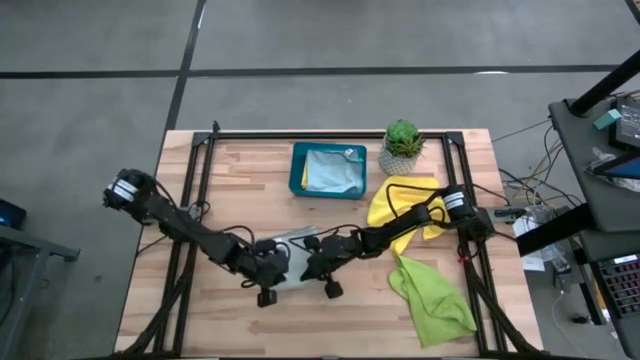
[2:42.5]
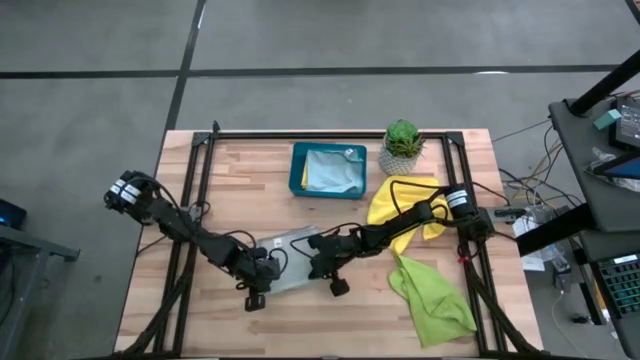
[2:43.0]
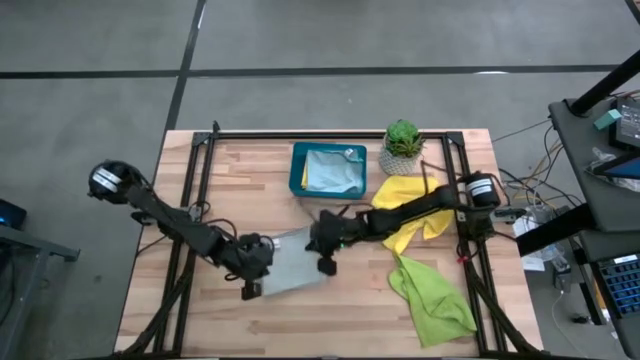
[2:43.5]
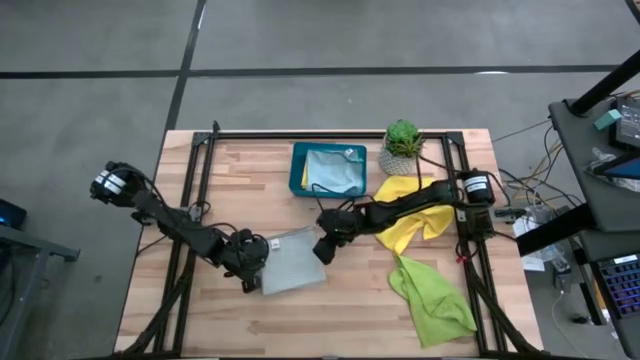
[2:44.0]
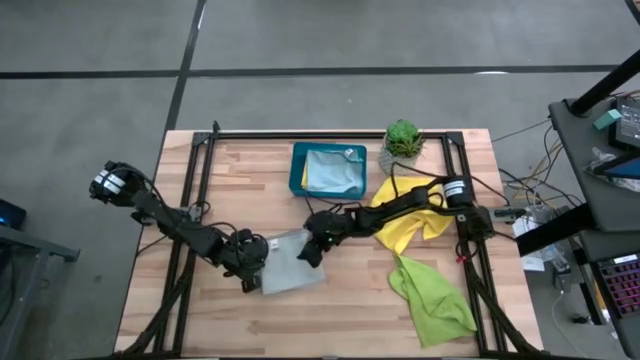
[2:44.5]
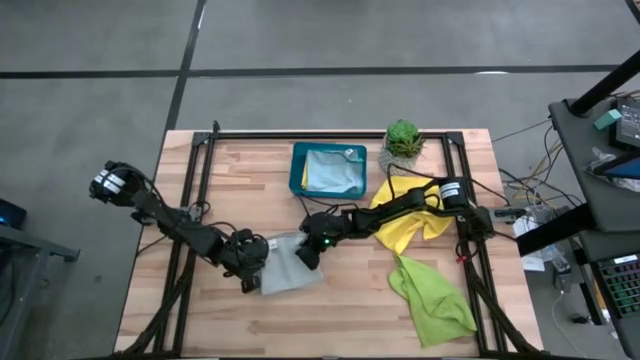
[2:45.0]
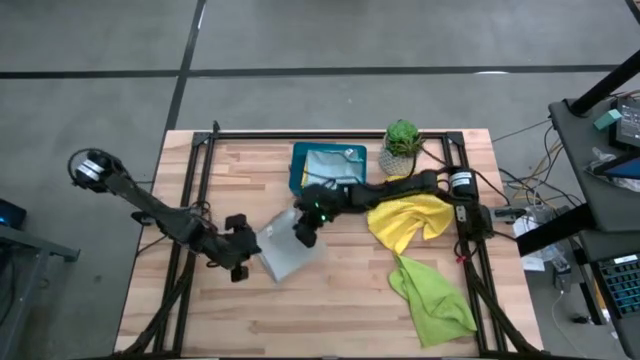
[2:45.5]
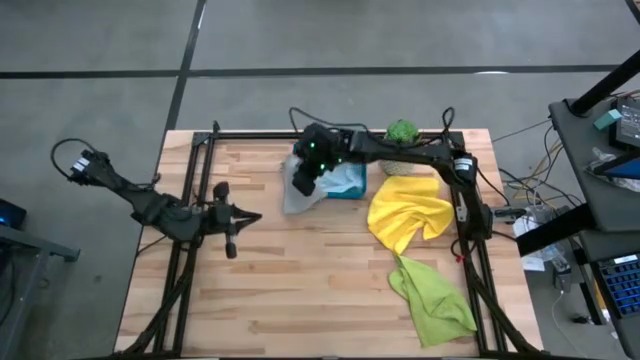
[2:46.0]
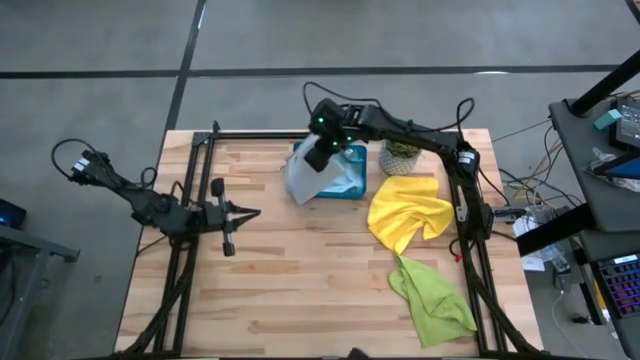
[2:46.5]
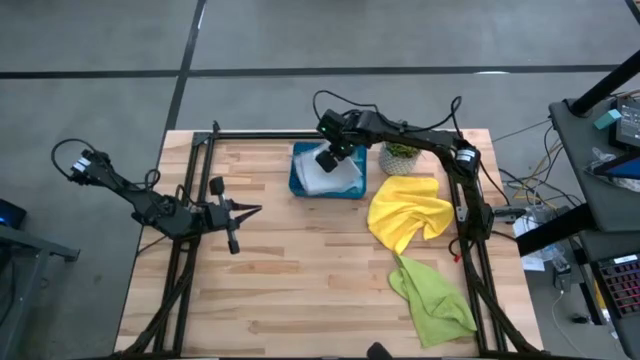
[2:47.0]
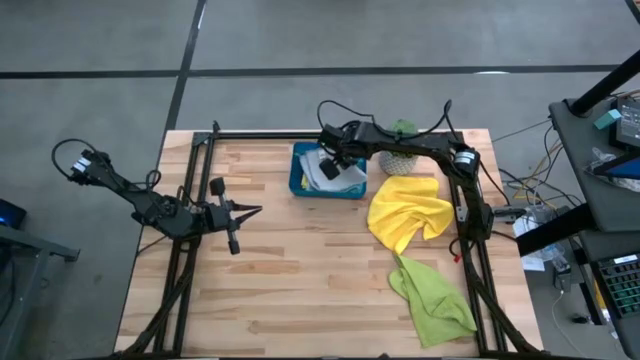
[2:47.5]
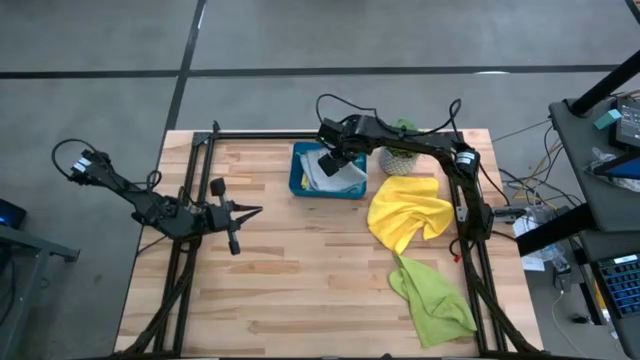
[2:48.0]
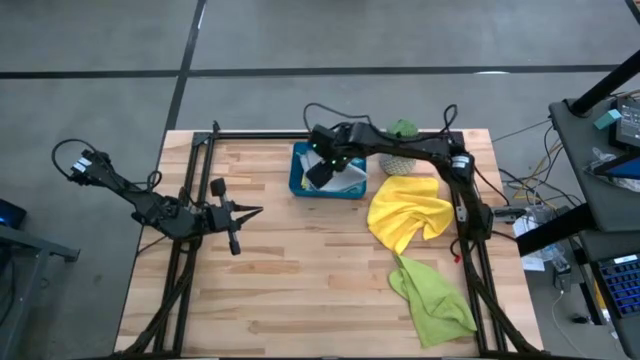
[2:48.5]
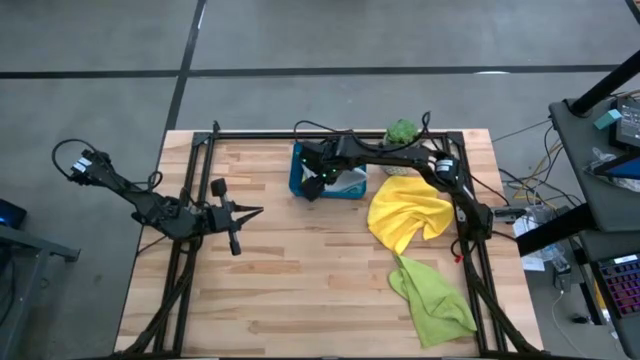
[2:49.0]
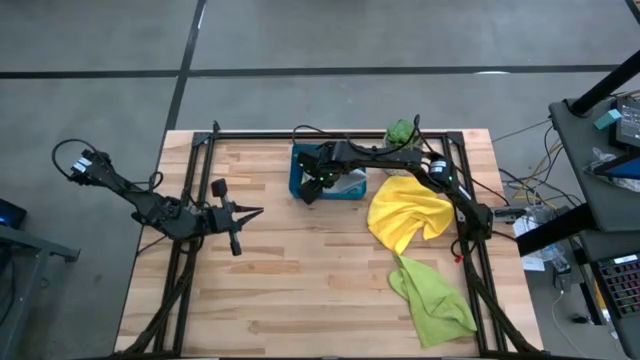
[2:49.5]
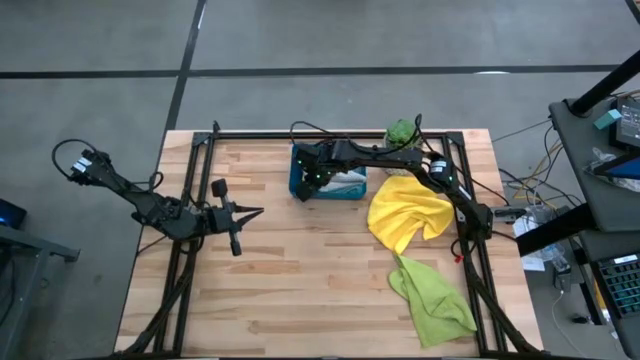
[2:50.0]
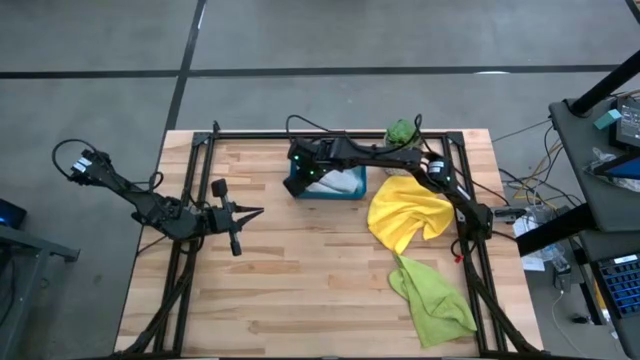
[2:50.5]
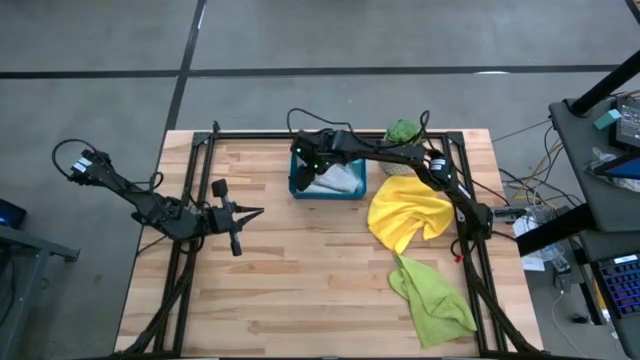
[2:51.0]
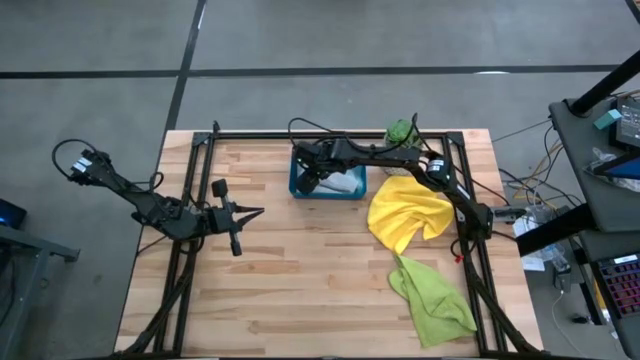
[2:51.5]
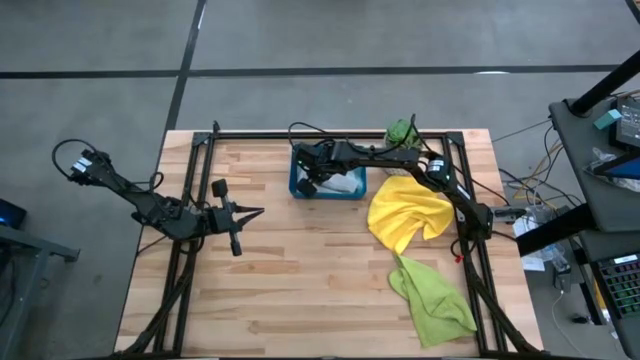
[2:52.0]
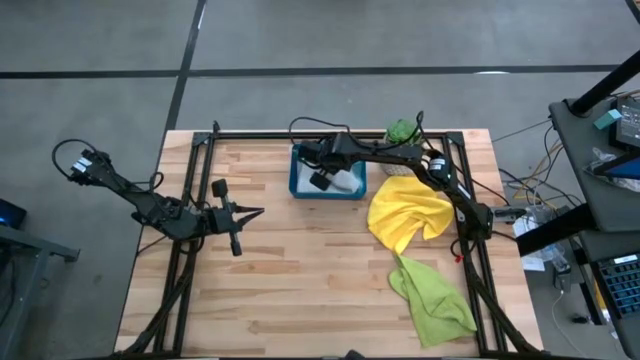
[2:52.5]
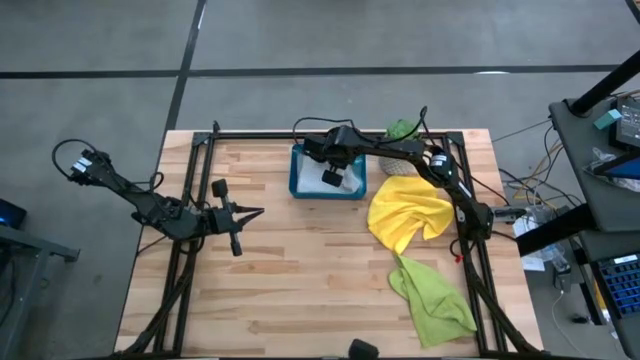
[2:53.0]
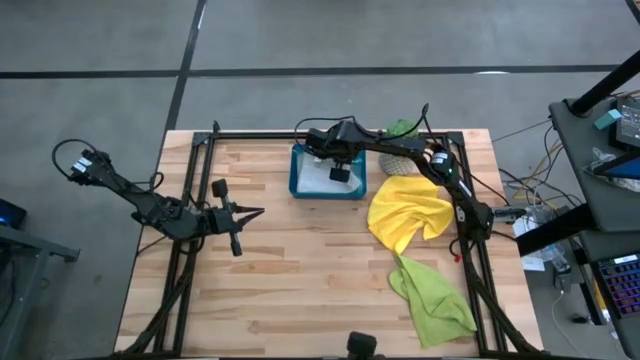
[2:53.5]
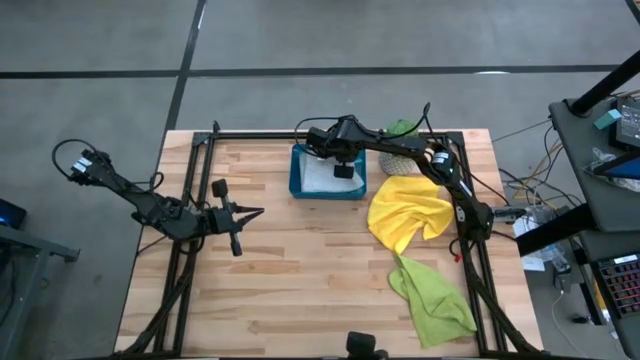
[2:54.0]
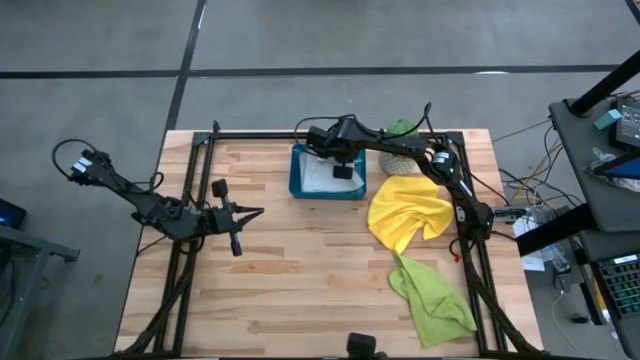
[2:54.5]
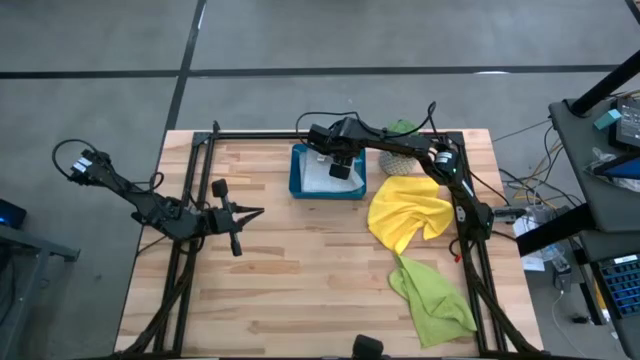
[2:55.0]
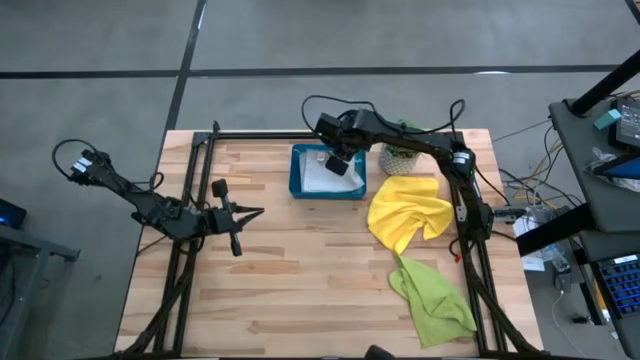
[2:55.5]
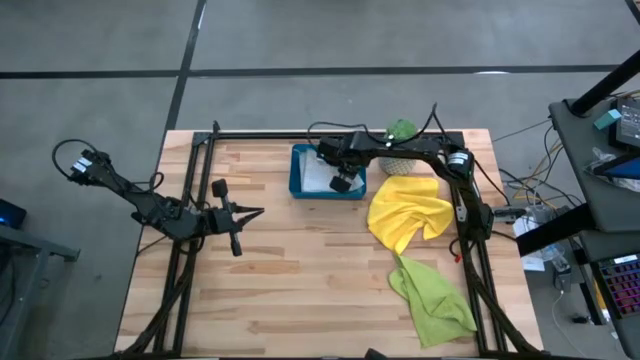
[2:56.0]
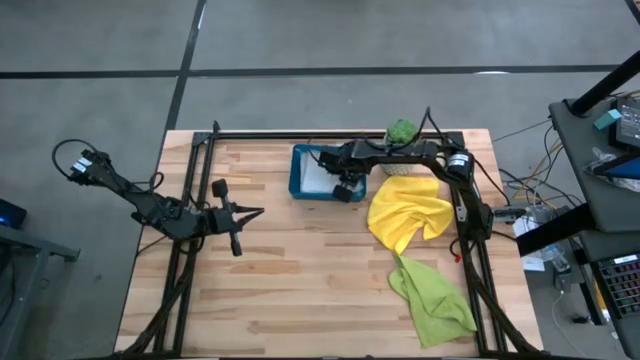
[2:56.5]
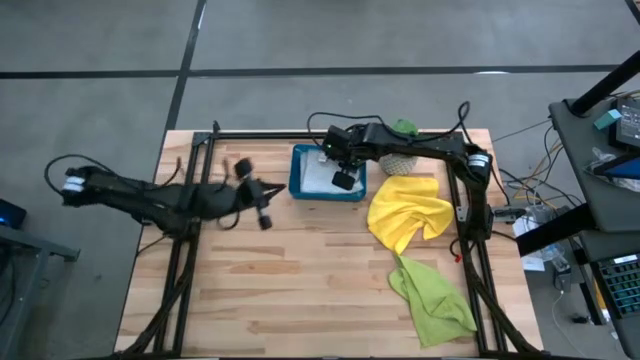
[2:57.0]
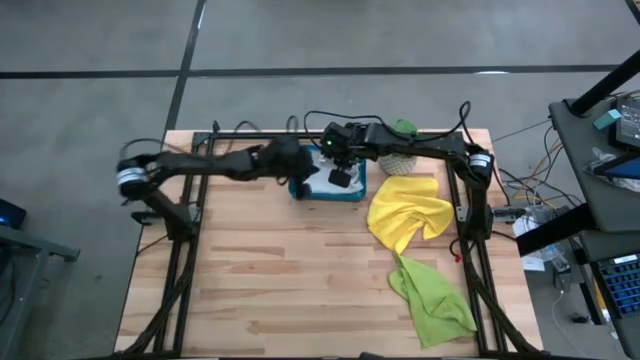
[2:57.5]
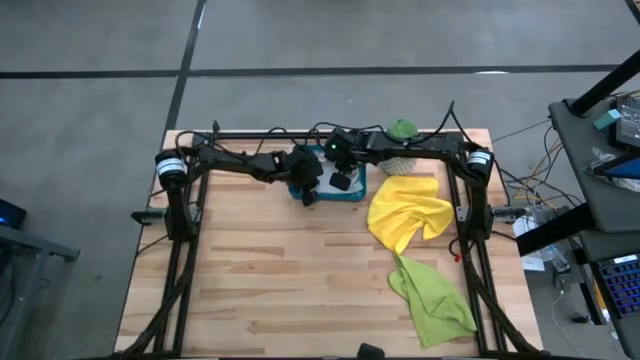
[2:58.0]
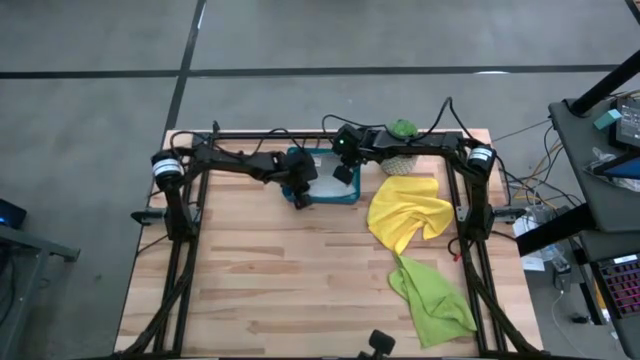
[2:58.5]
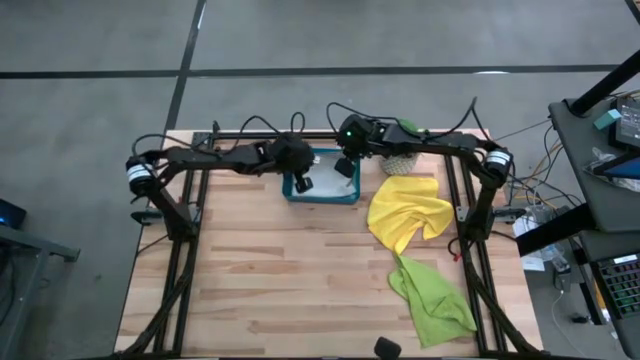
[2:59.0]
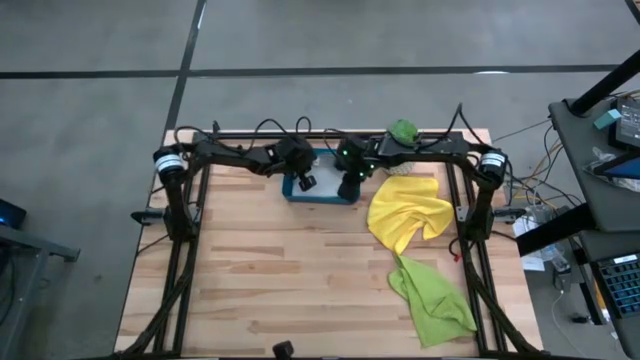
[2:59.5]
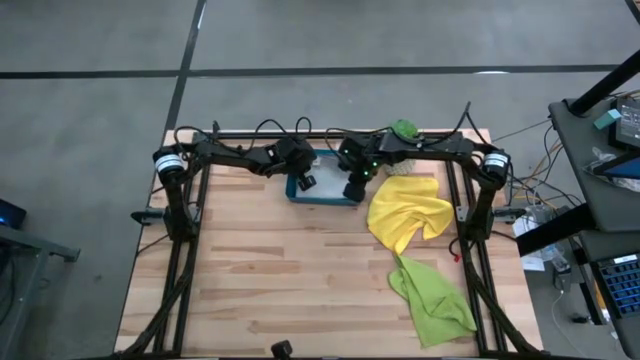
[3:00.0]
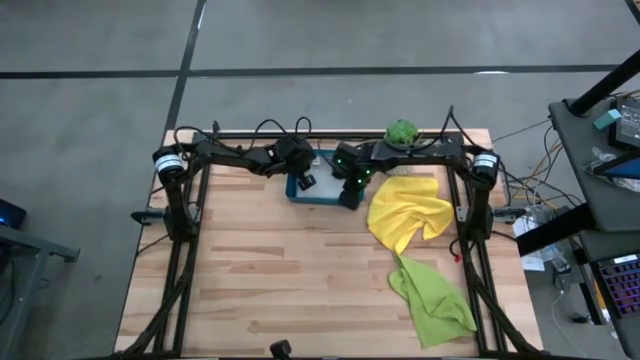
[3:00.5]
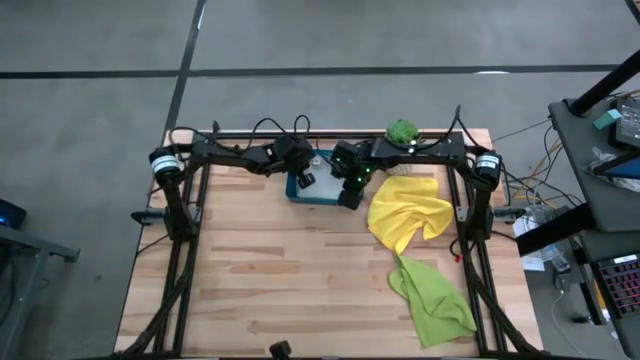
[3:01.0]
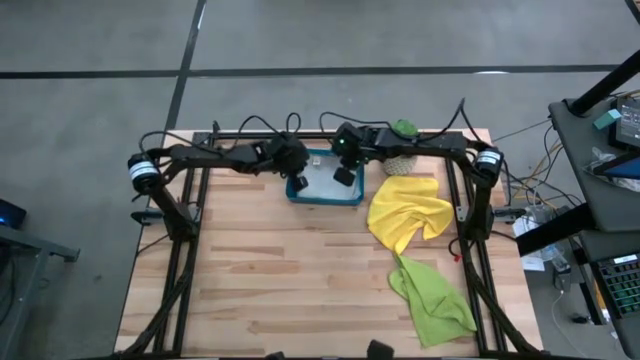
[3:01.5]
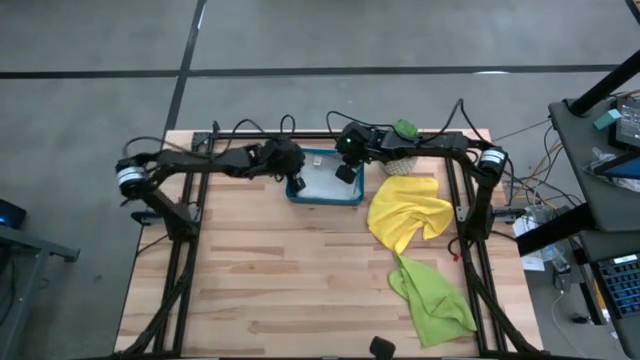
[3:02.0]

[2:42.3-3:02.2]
Task: Fold microfiber towels
Put the folded grey microfiber cloth into the bin
